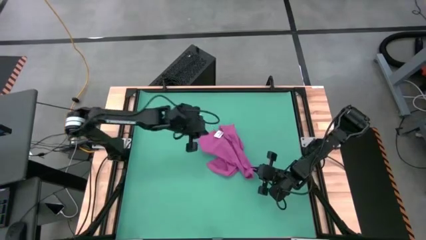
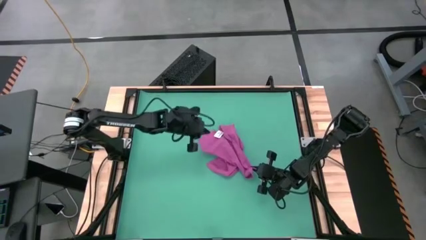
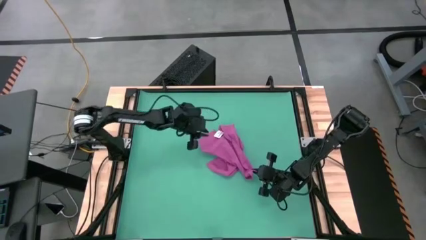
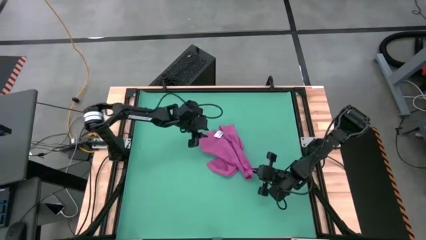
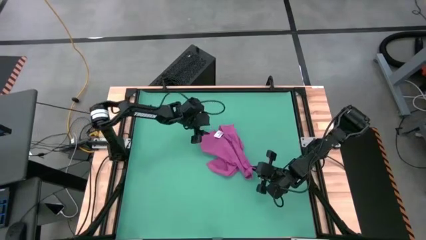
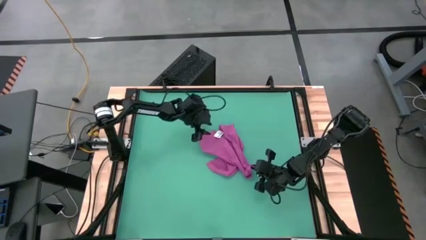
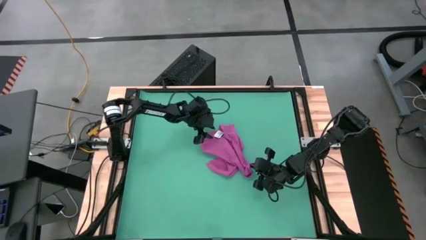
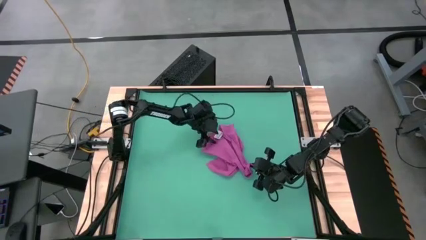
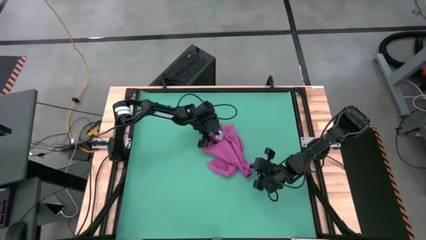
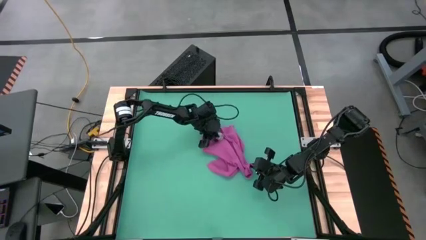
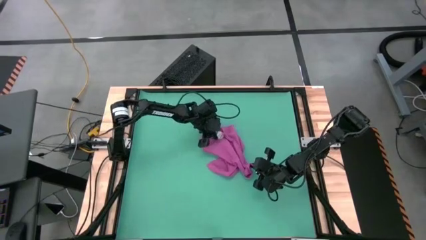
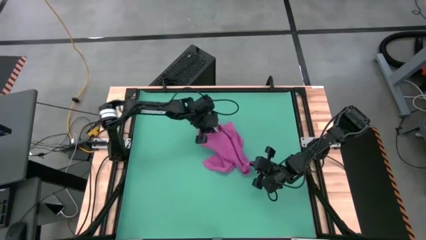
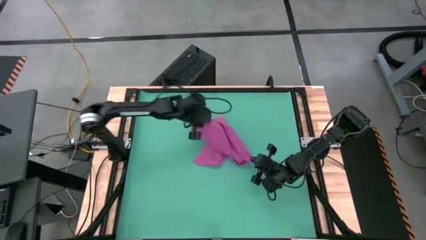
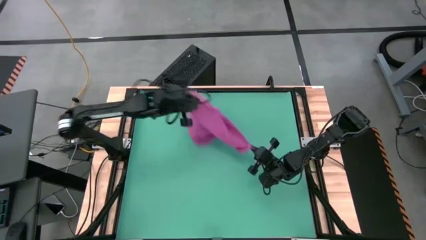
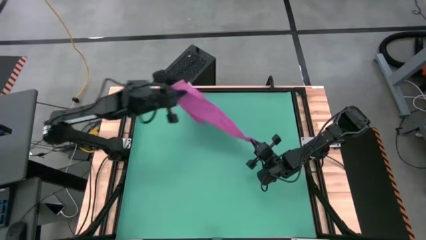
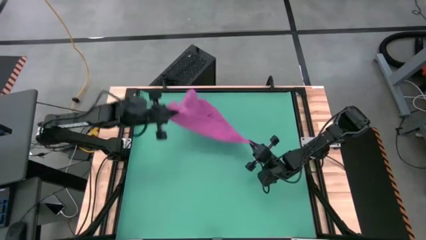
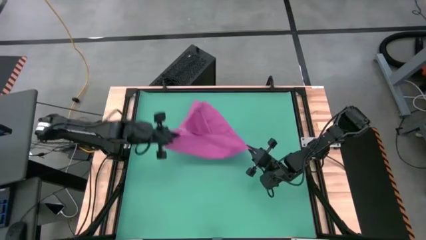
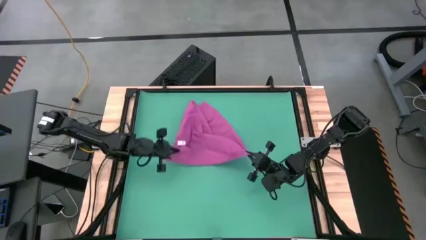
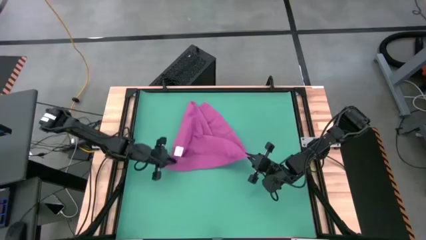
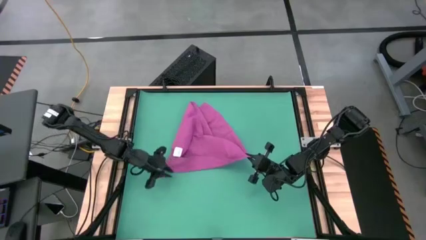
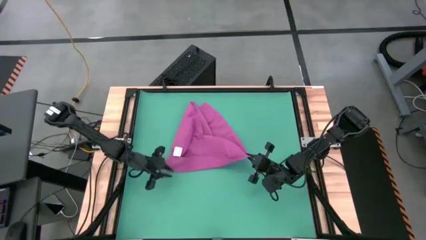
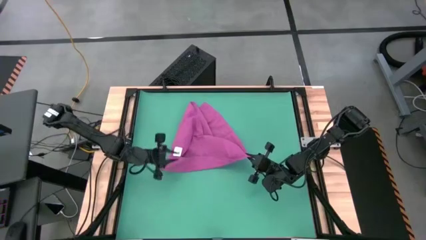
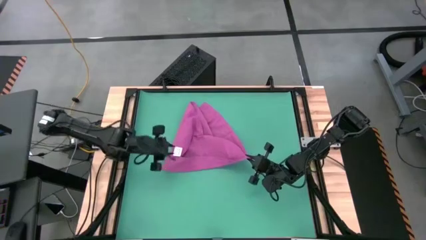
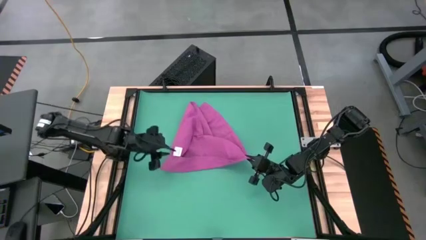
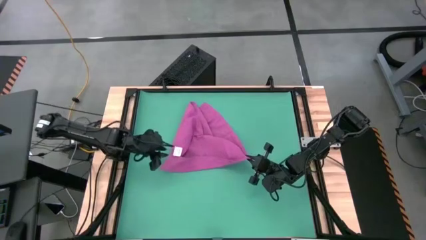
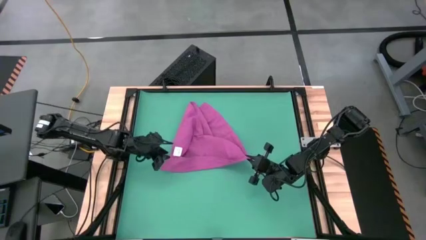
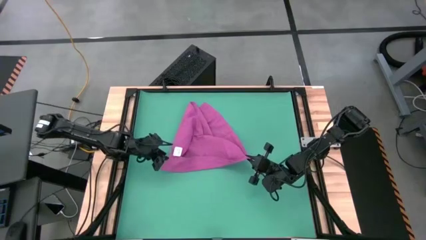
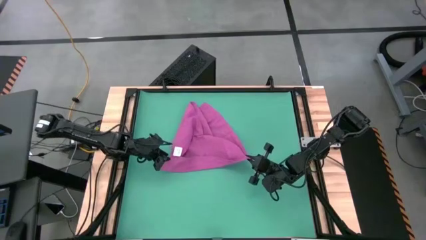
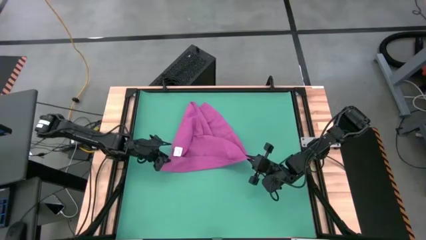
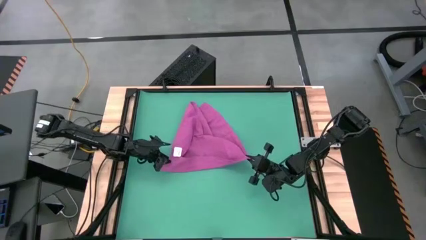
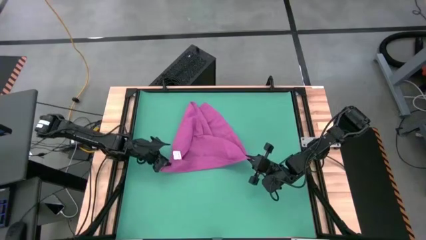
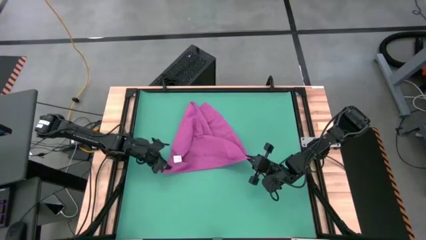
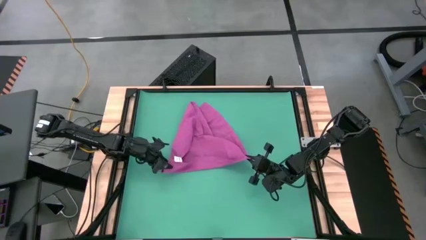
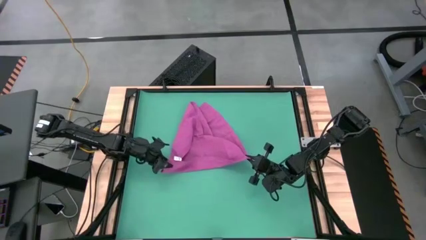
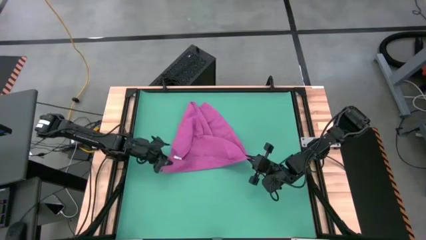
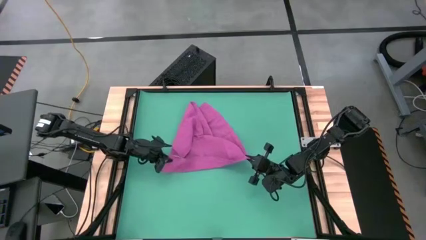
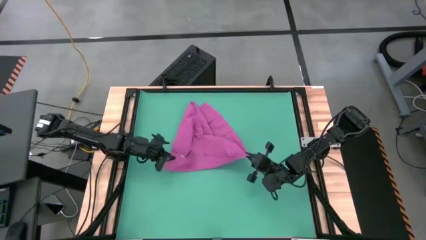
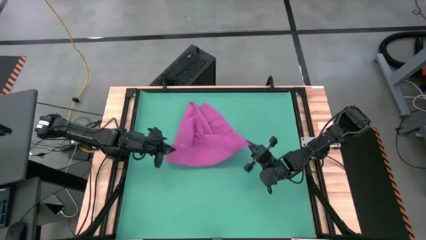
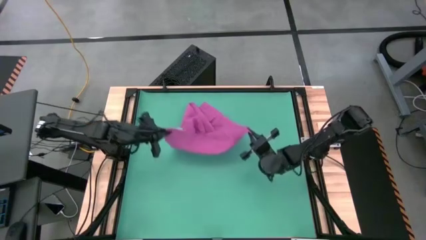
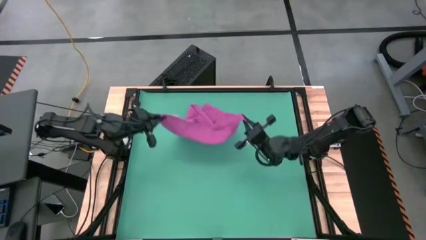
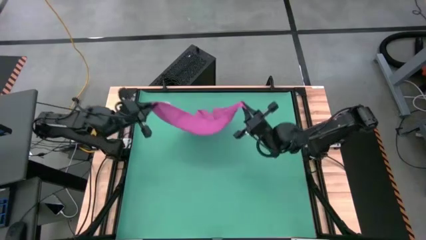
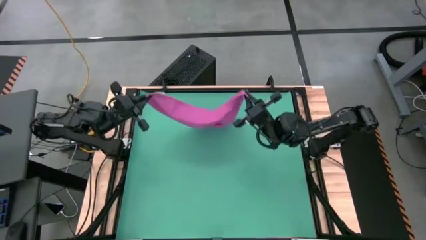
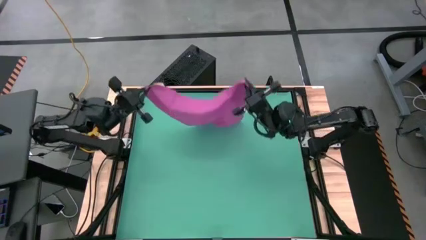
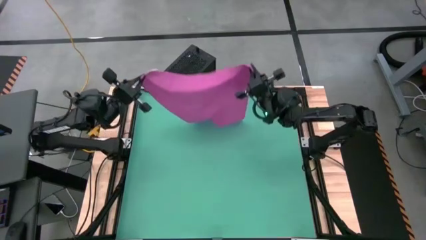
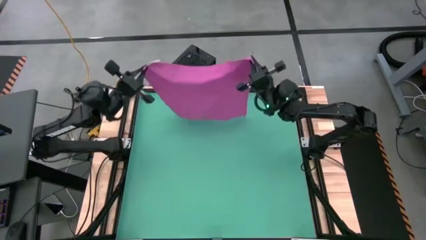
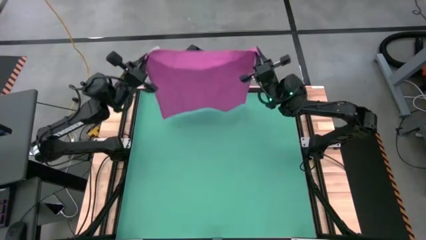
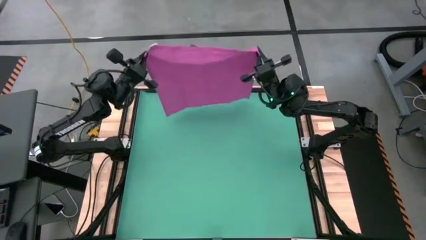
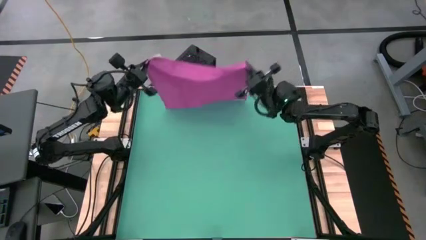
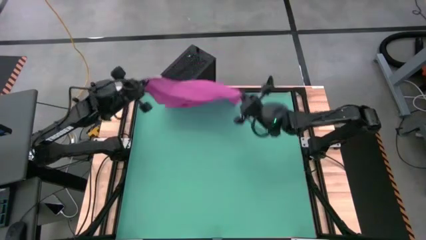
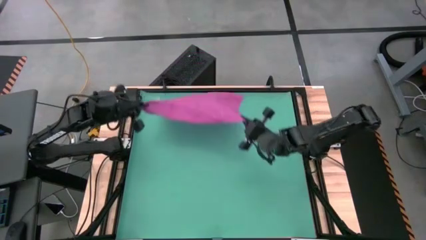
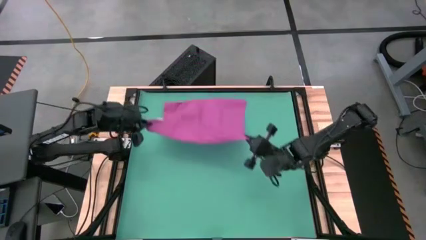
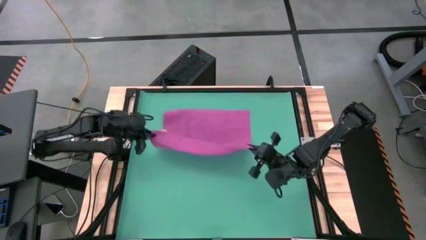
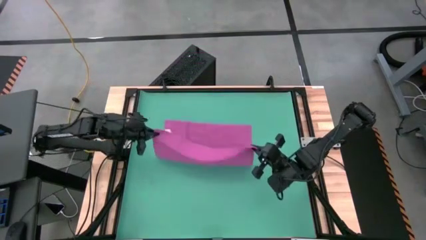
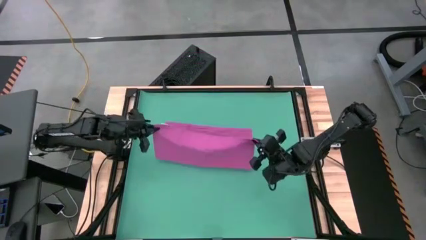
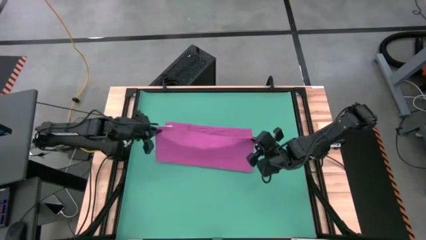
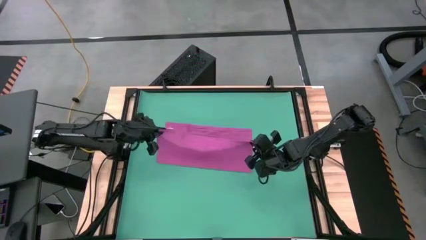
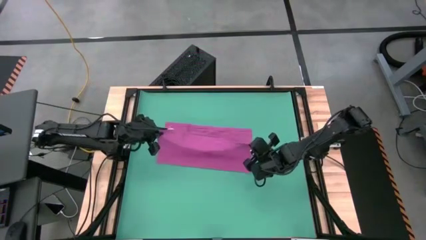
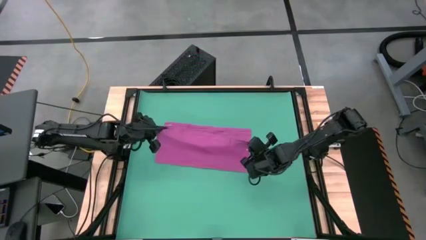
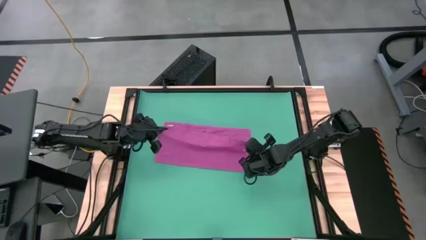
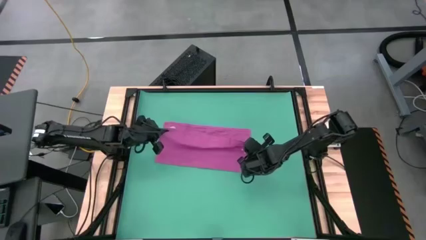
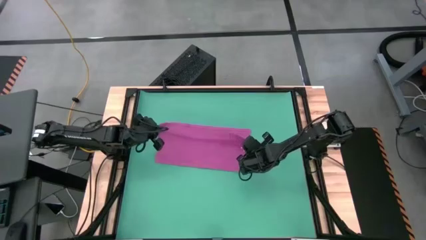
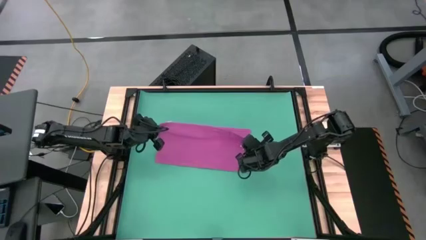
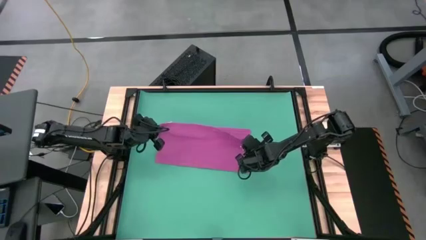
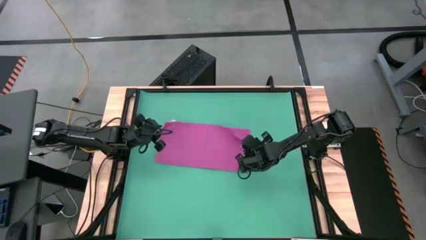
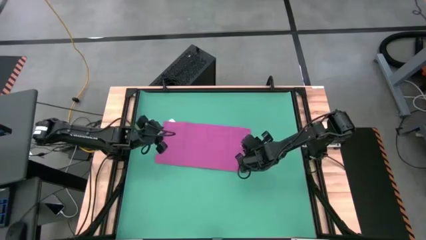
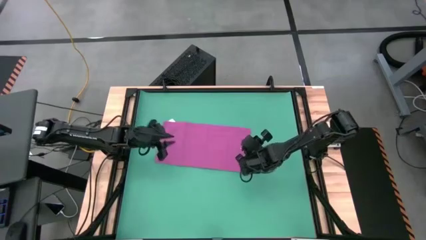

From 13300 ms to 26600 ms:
Task: Roll towel into tight, uniform cylinder
Roll the pink towel
